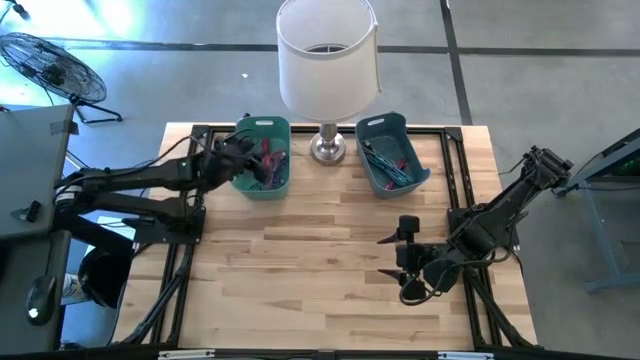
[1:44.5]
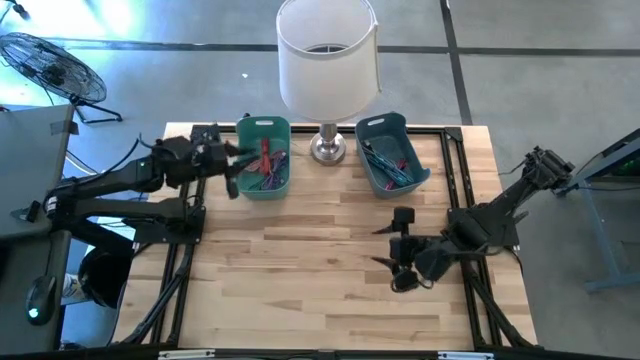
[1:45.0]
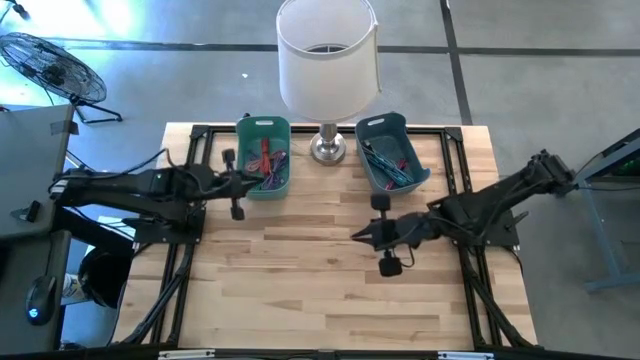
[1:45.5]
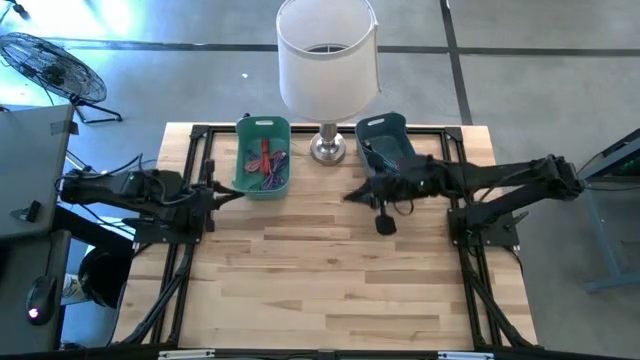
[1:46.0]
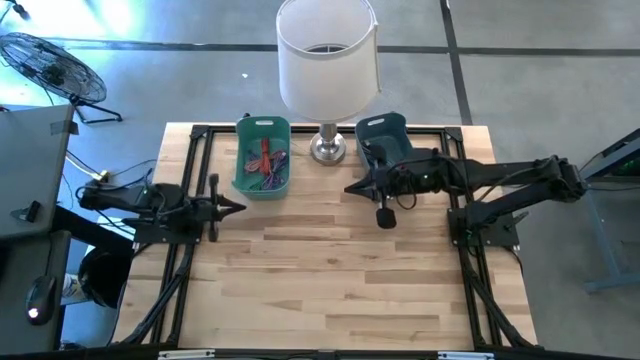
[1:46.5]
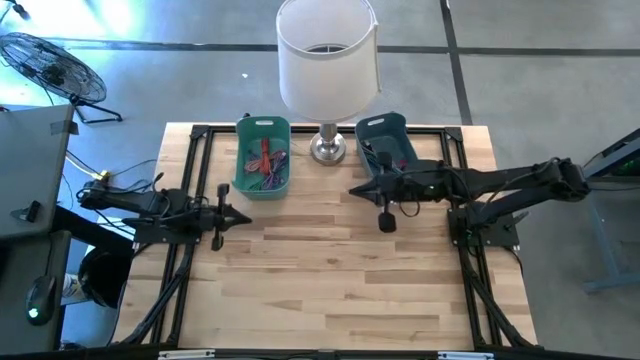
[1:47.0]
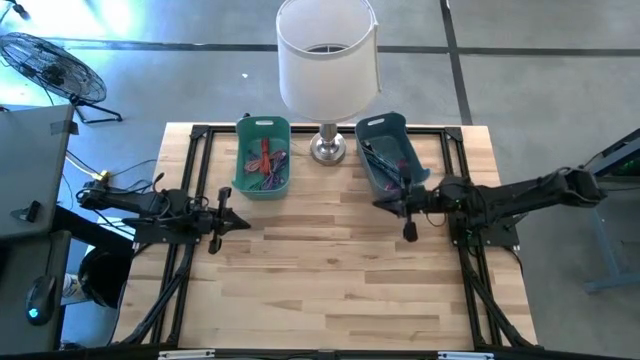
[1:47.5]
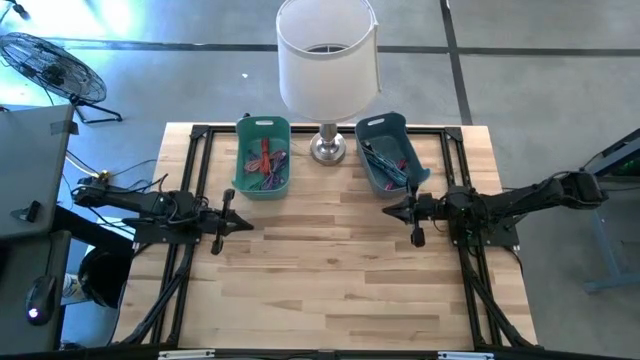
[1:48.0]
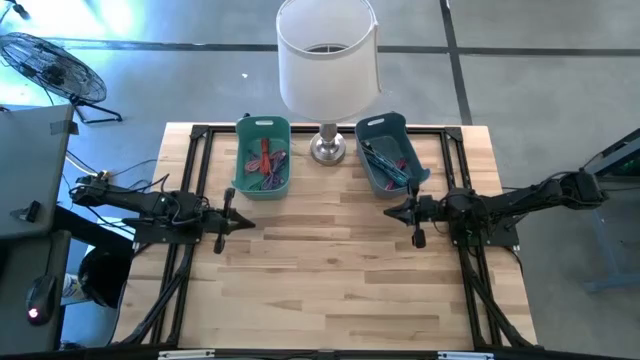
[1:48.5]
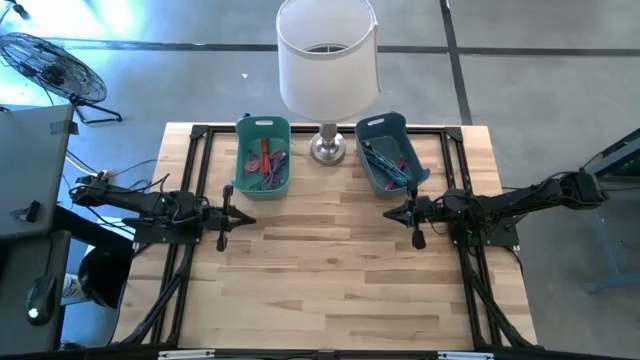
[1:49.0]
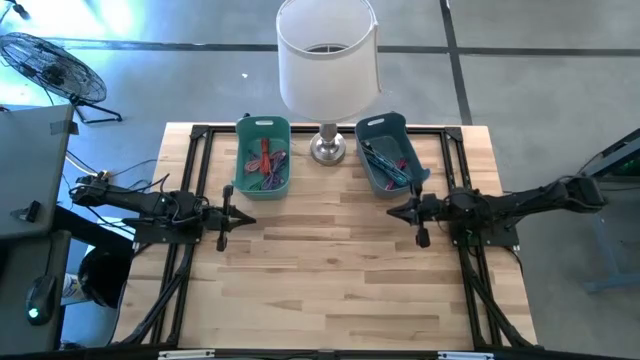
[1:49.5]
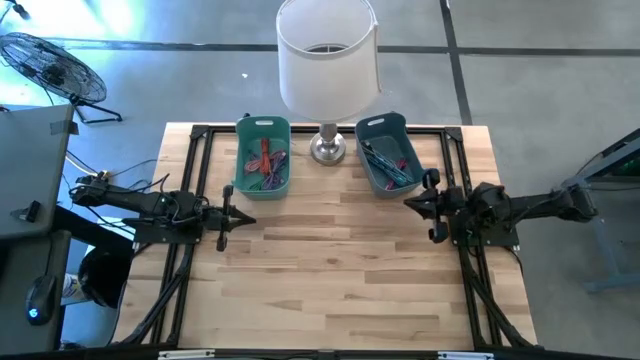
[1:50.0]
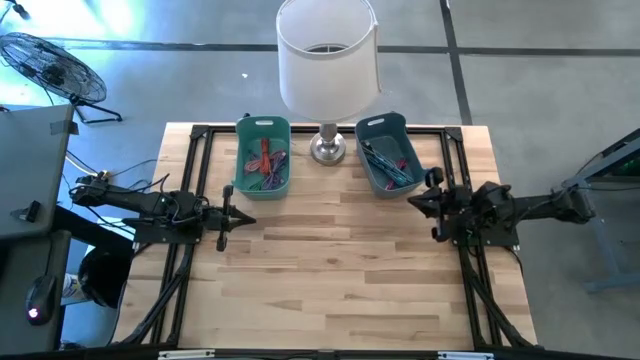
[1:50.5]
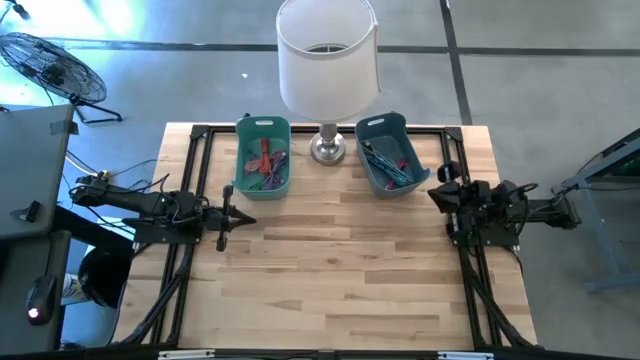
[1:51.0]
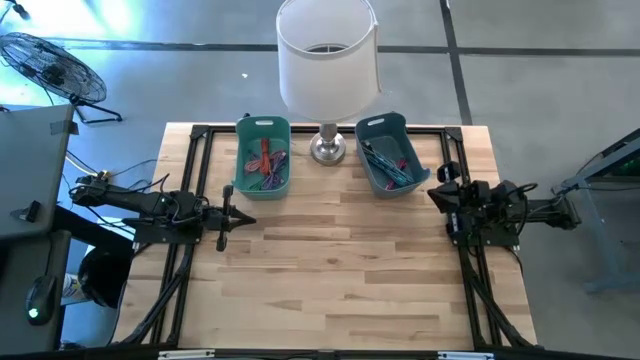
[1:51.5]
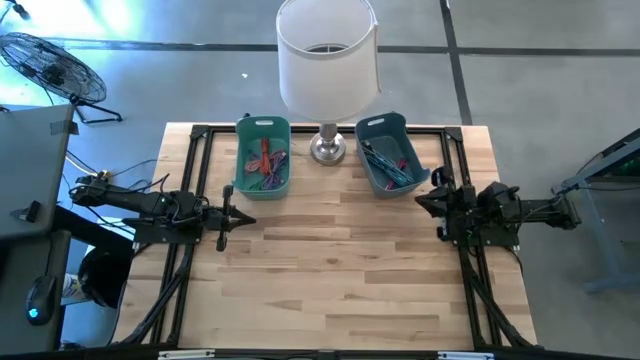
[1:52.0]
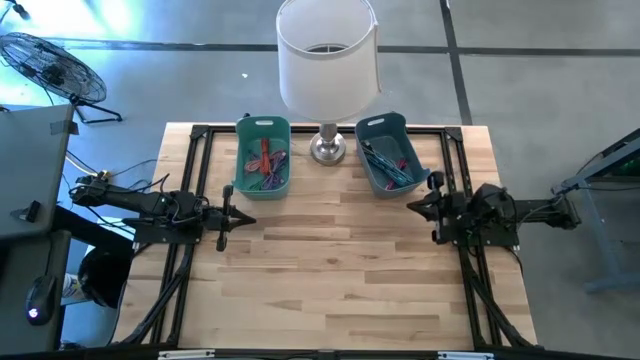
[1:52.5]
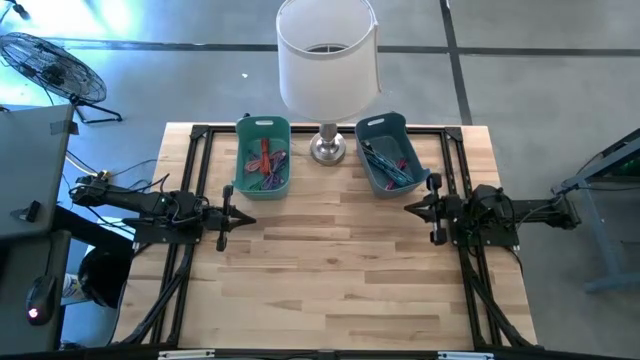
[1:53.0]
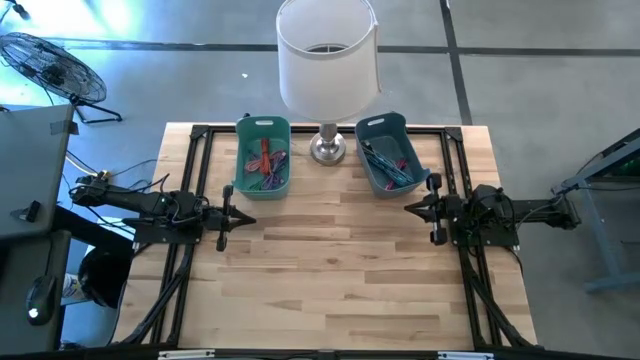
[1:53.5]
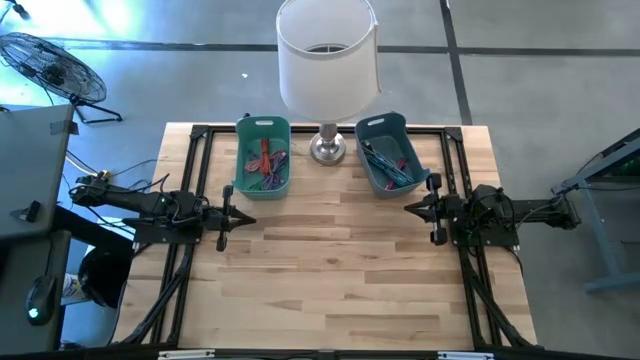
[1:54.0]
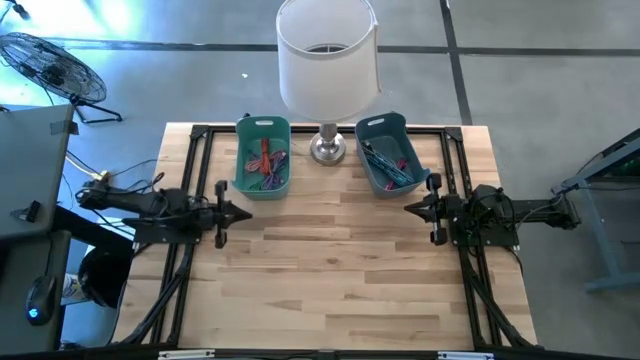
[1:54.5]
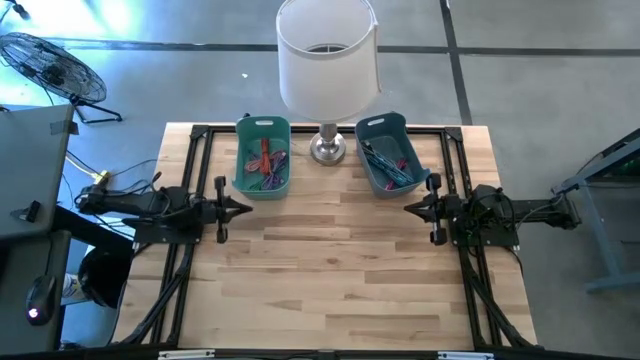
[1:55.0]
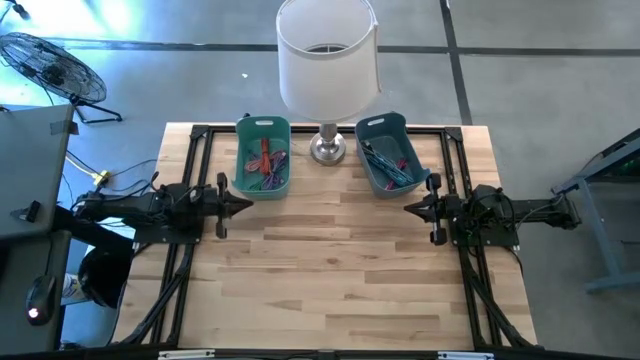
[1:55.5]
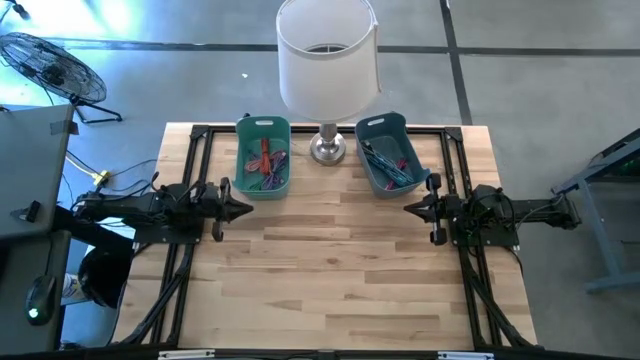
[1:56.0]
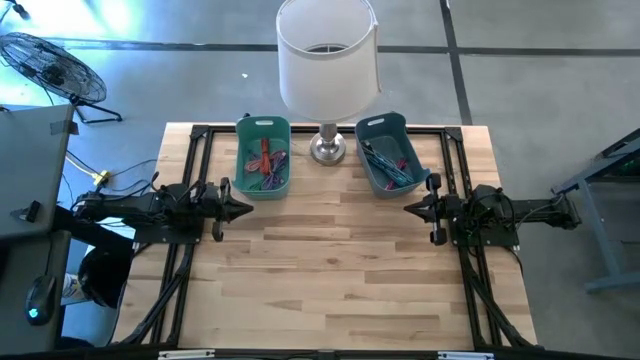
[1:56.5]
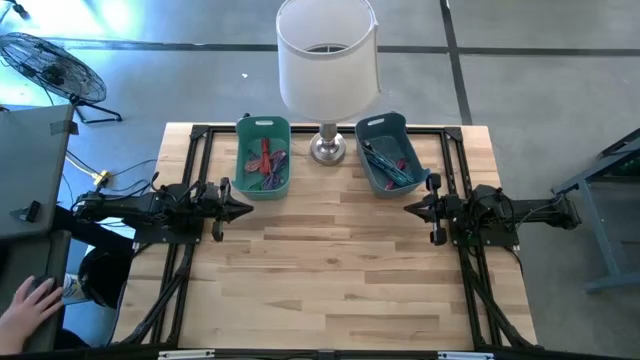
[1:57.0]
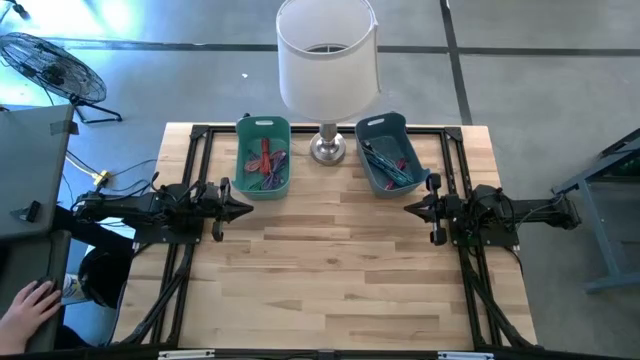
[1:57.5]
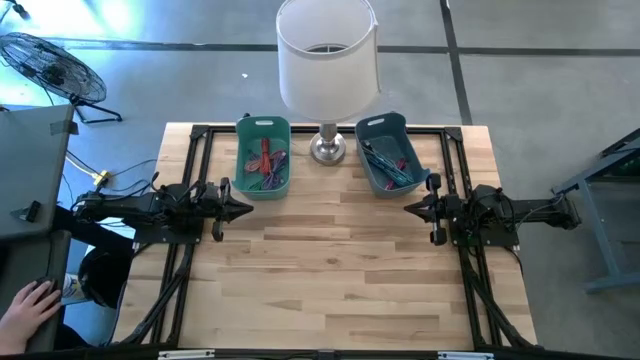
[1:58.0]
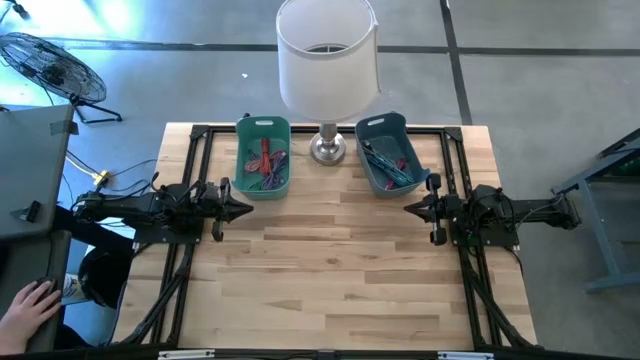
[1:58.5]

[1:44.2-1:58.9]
Task: Pick & Place USB Port
Return to Home Position

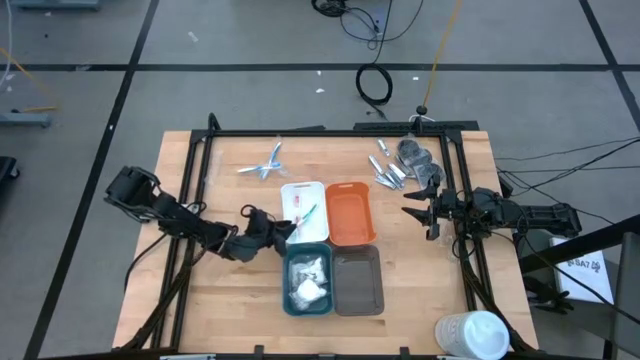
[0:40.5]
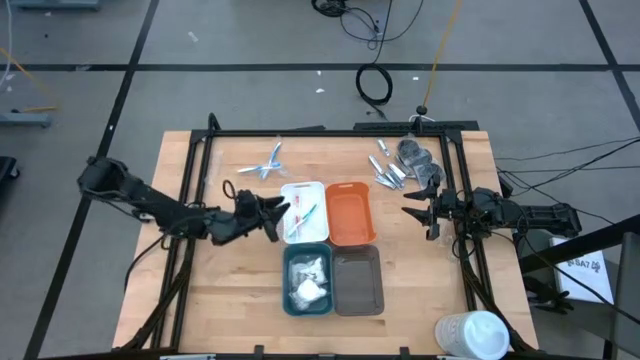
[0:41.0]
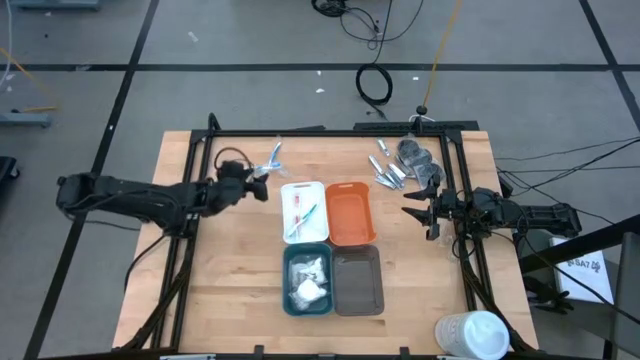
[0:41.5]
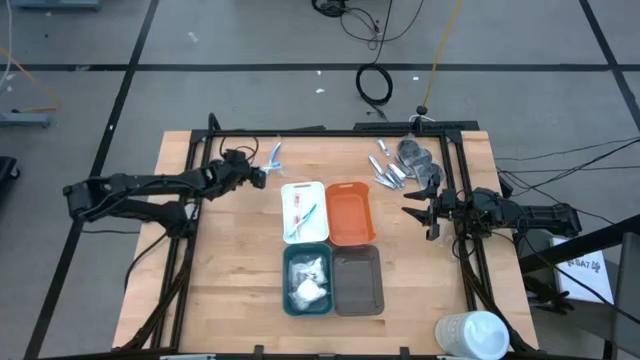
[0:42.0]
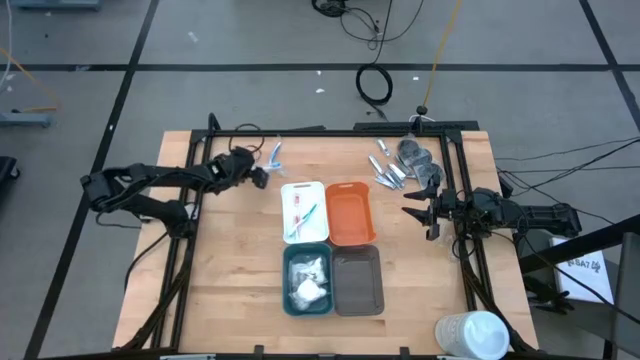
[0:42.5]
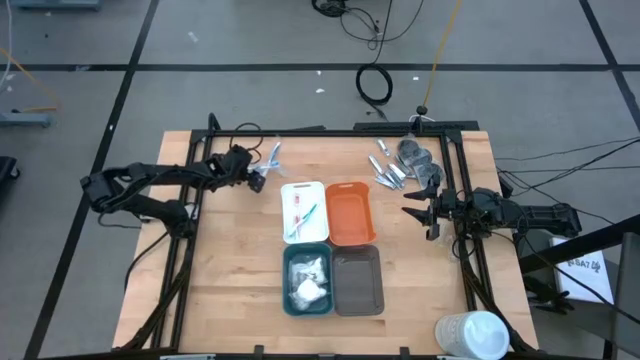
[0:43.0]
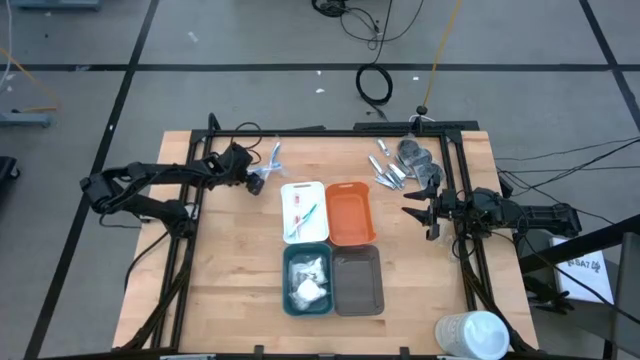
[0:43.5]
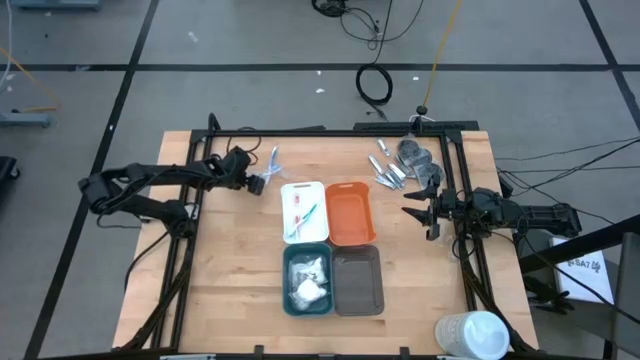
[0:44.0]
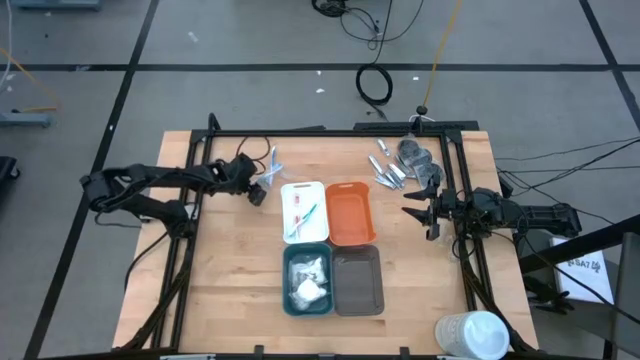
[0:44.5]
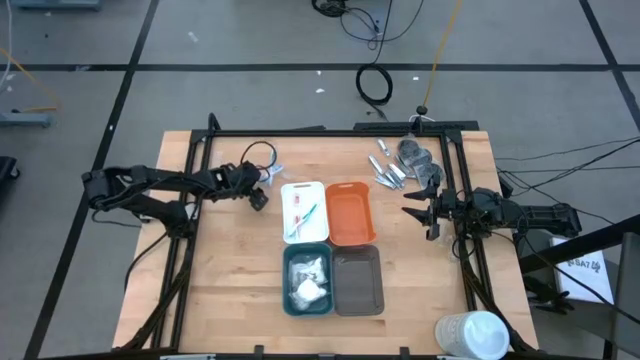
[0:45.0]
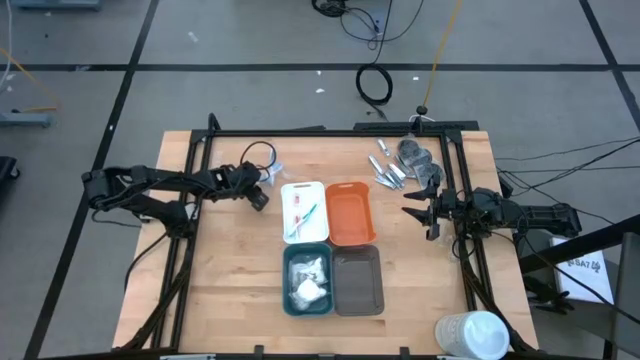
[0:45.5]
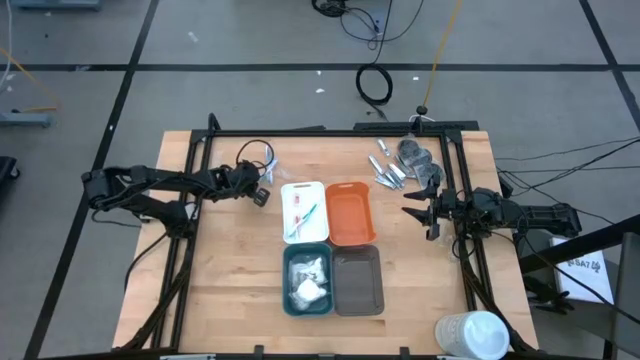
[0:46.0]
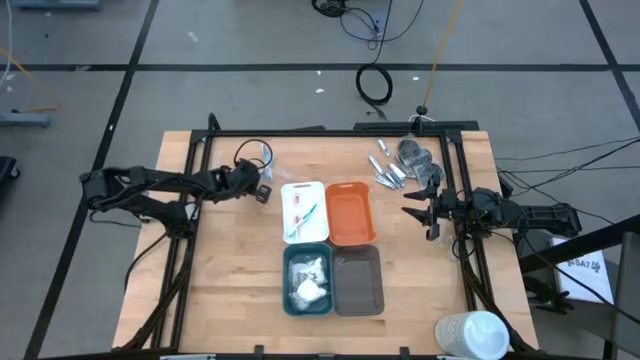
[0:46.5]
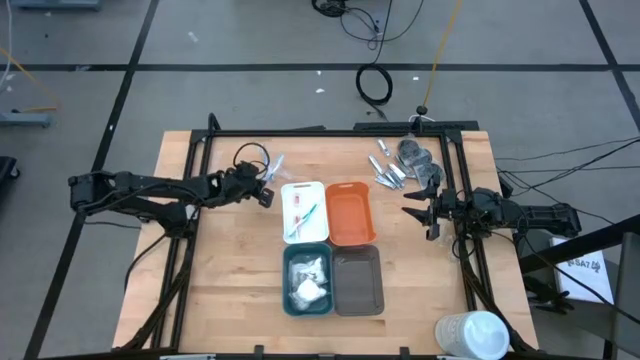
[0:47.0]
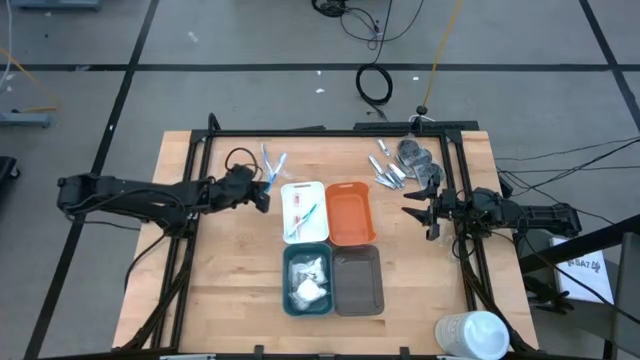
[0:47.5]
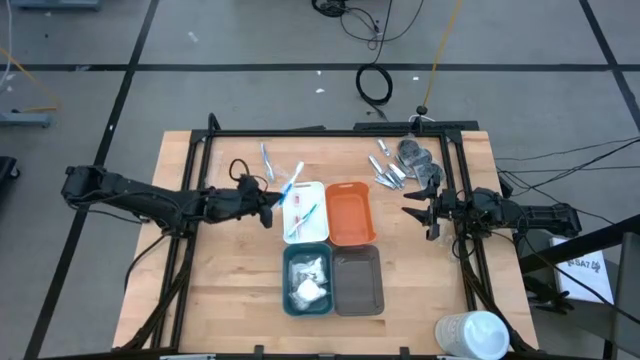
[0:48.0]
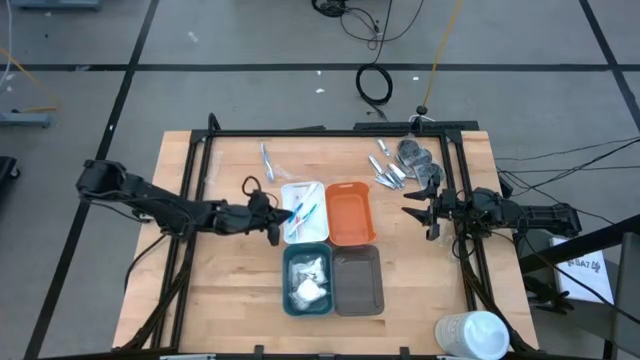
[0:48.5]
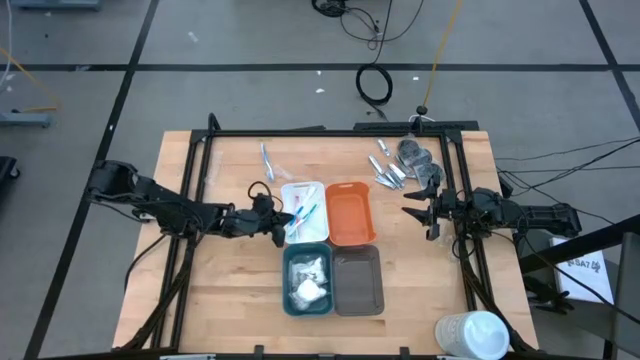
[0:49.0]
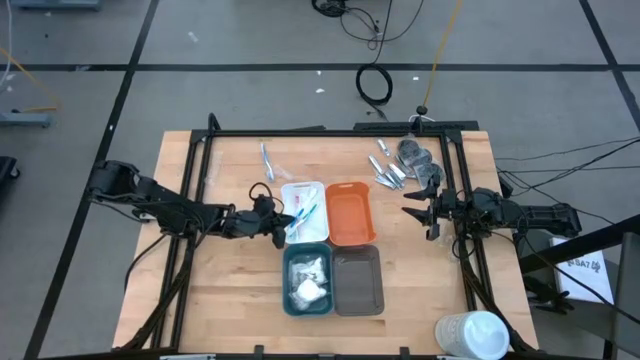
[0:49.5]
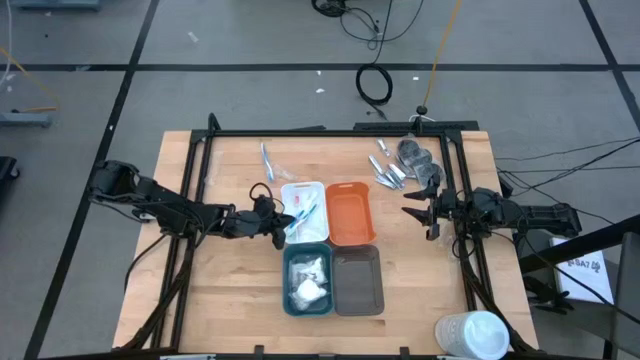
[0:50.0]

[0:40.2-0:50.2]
Task: Pick & Place Travel size toiletries
Put the top blue toothbrush into the white bin
